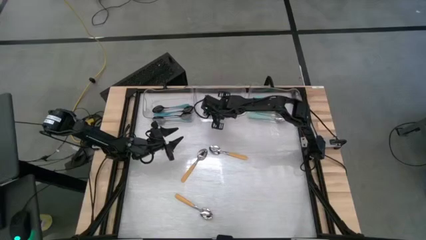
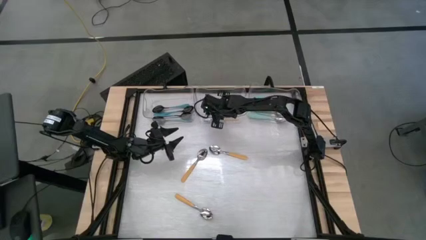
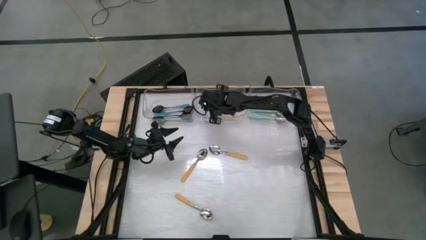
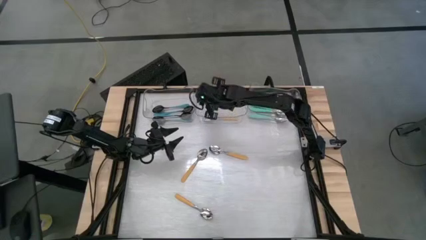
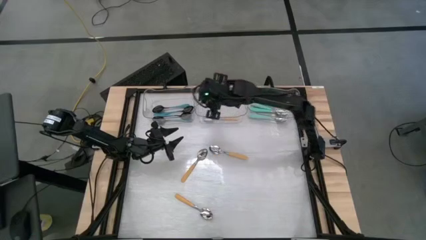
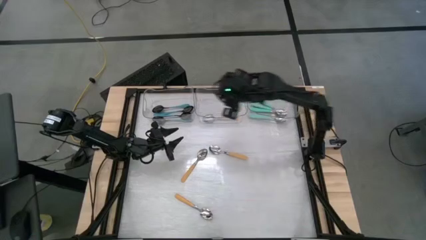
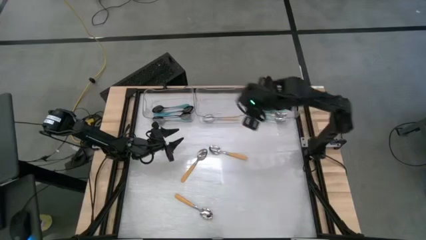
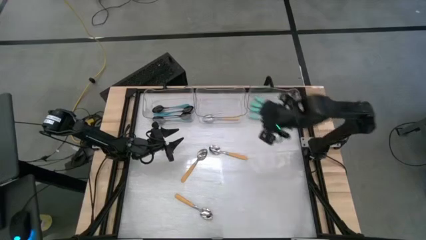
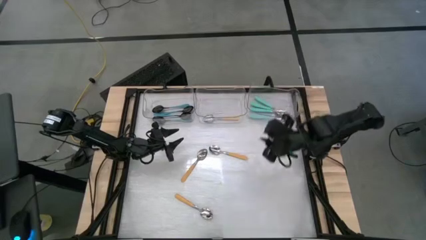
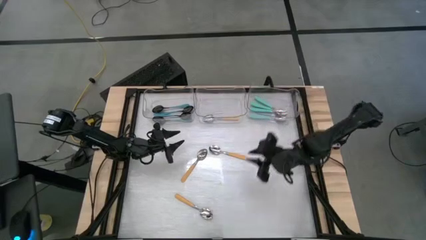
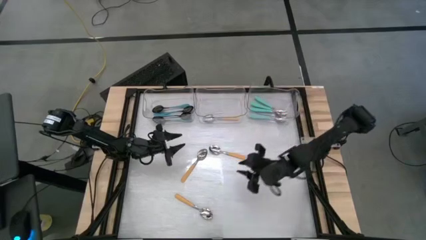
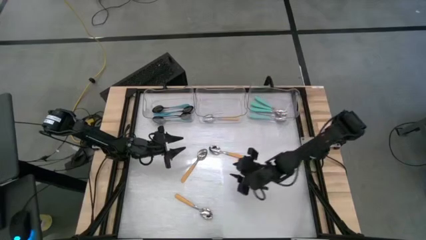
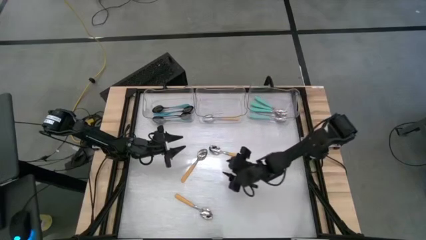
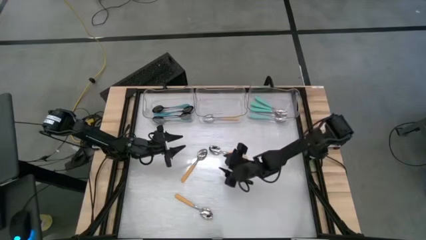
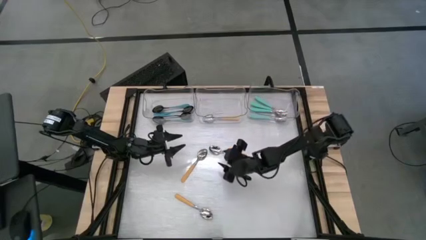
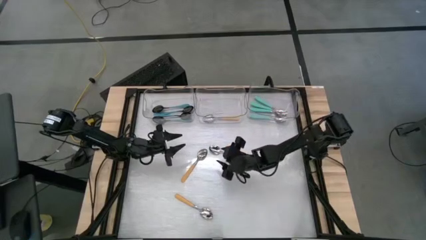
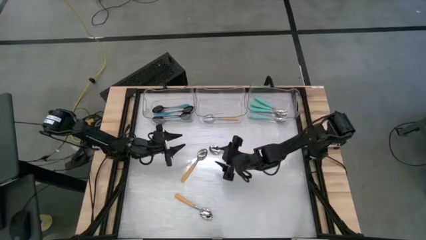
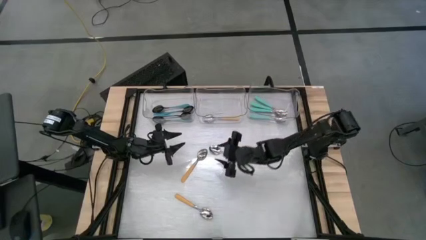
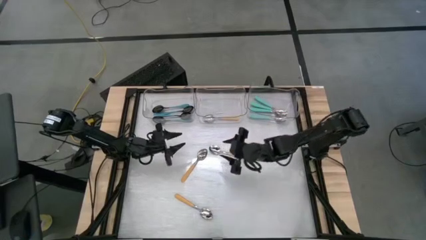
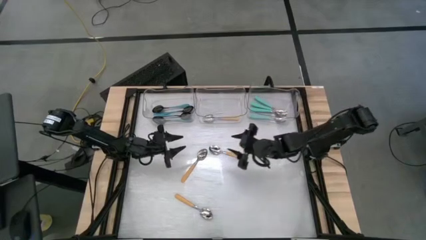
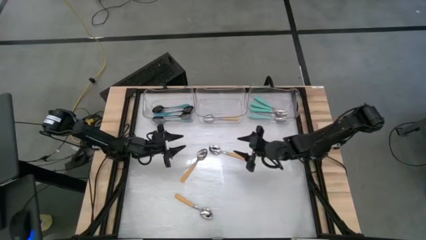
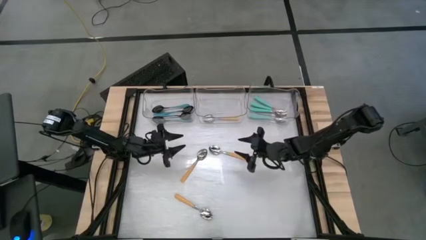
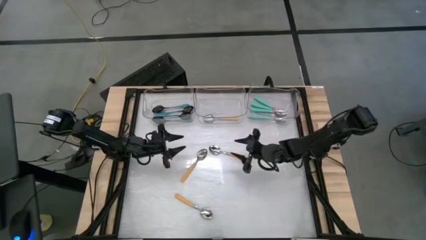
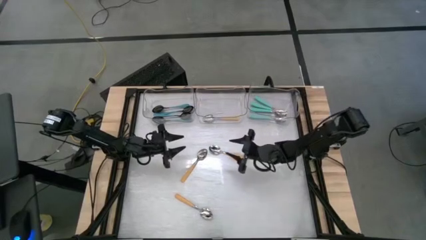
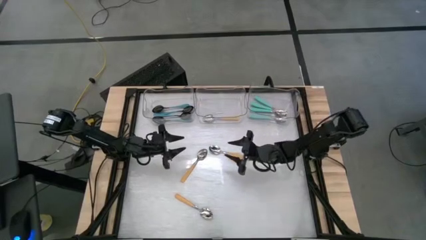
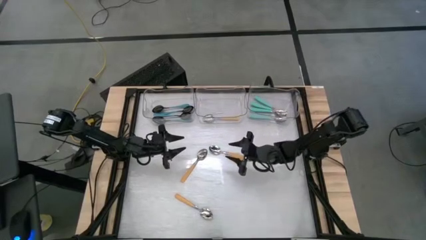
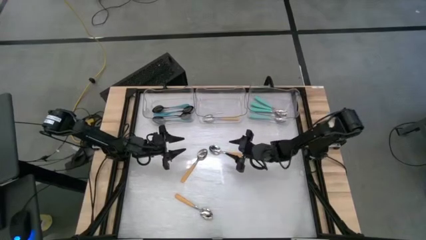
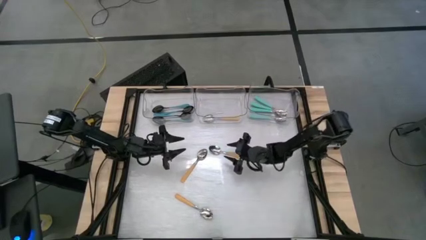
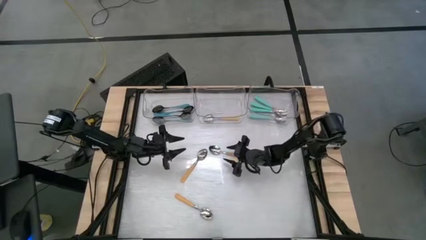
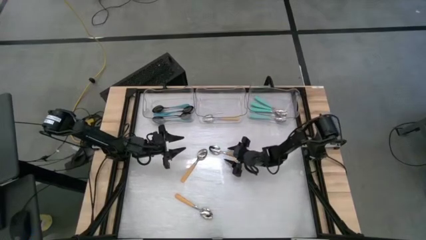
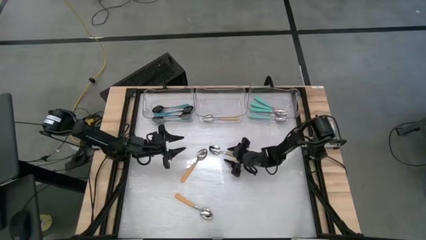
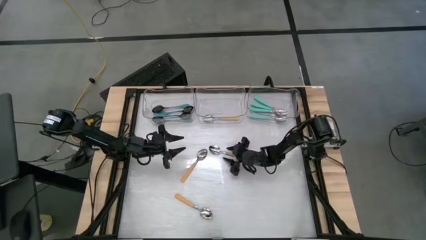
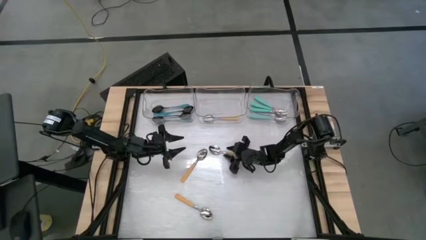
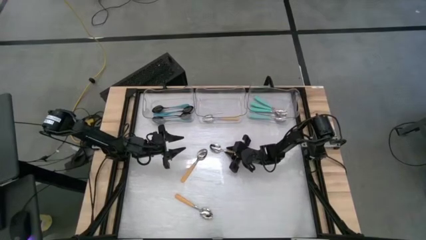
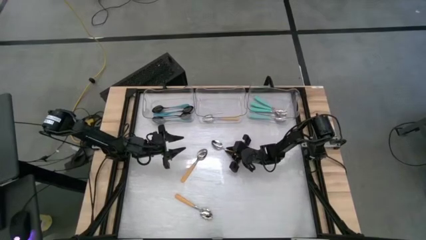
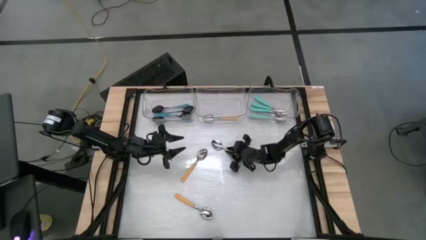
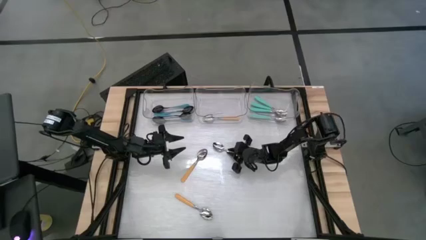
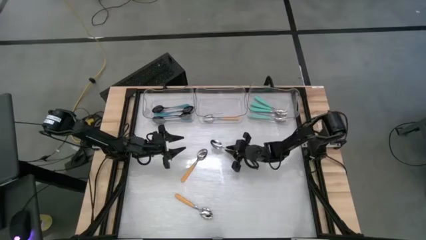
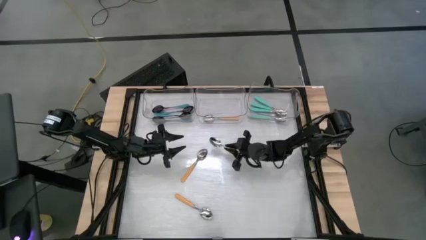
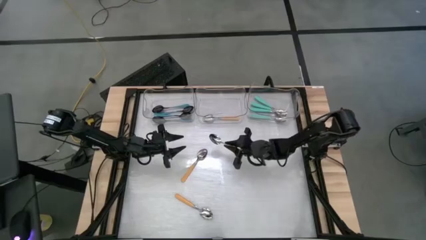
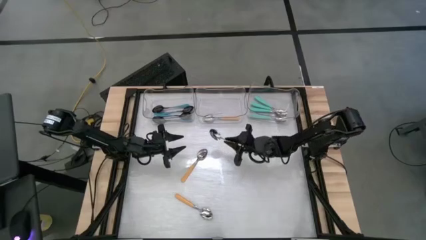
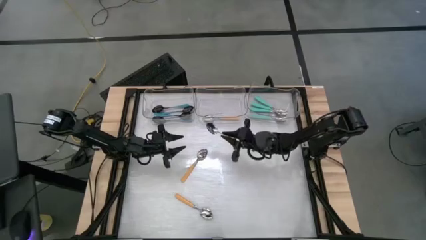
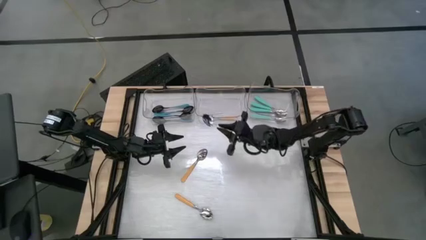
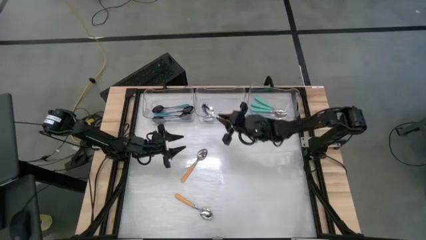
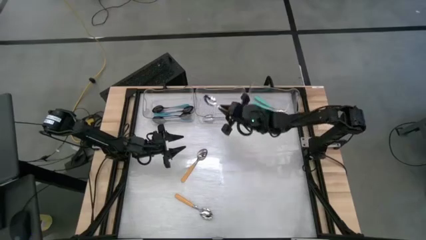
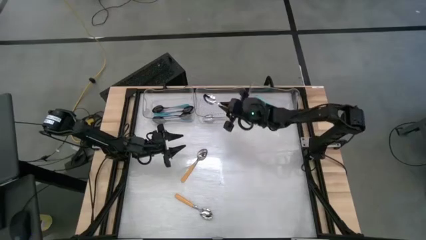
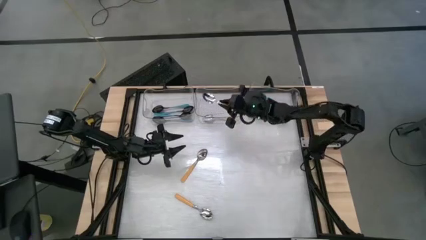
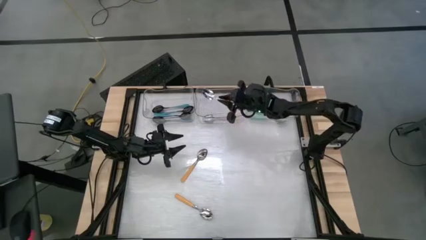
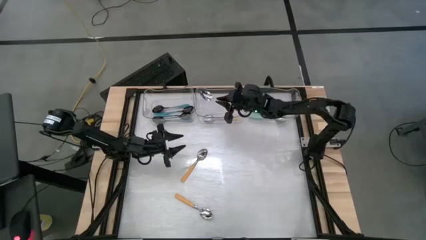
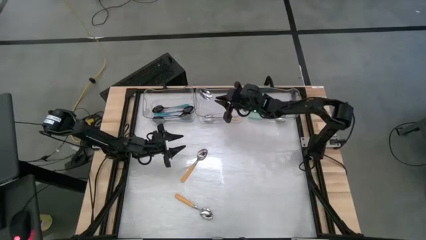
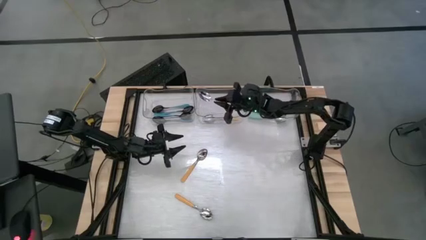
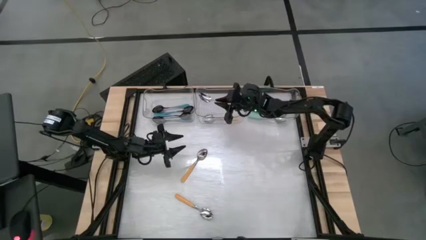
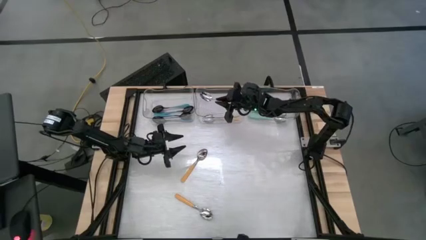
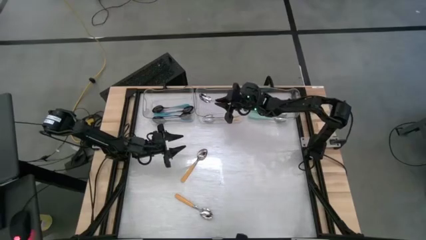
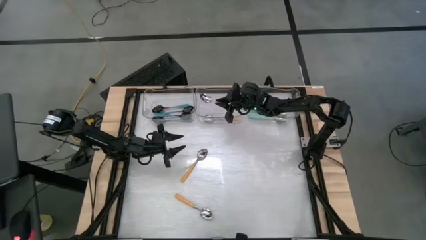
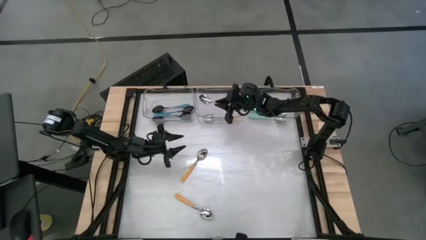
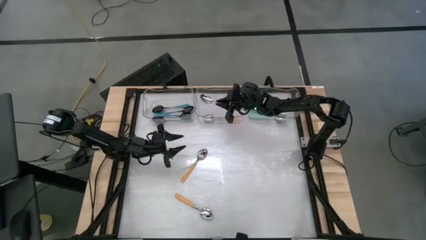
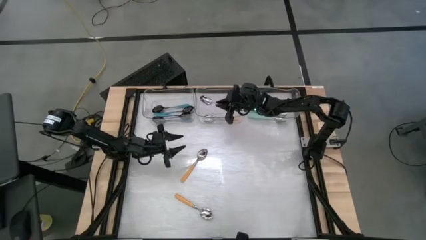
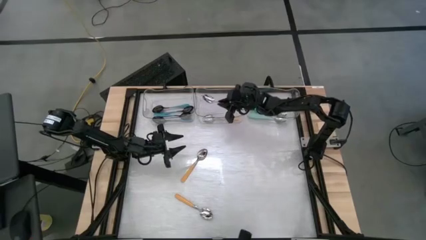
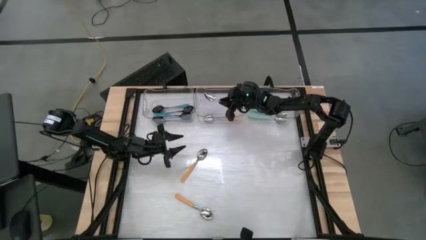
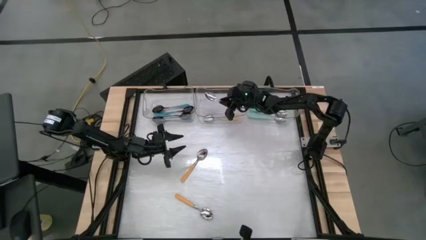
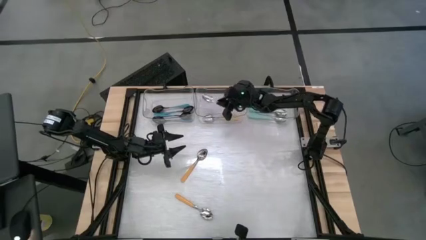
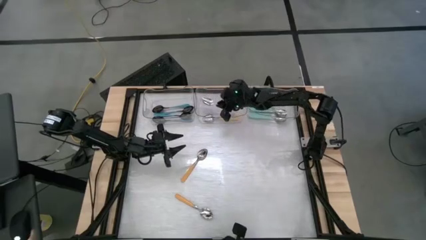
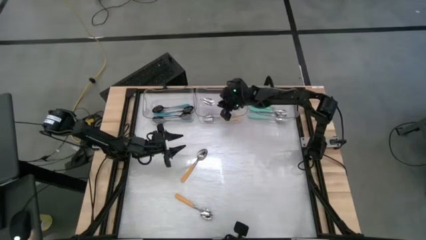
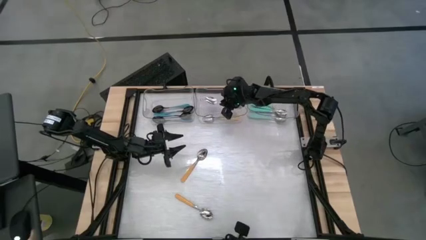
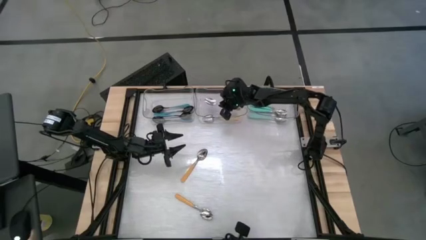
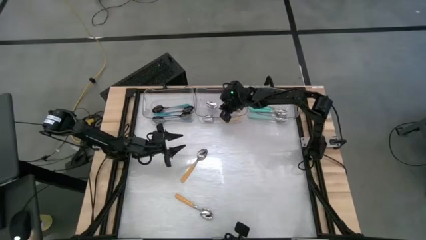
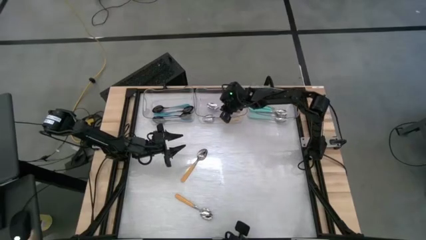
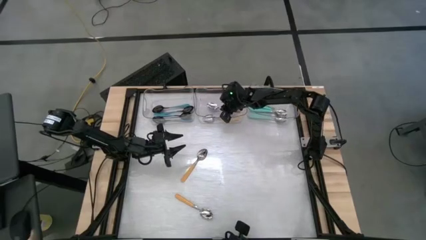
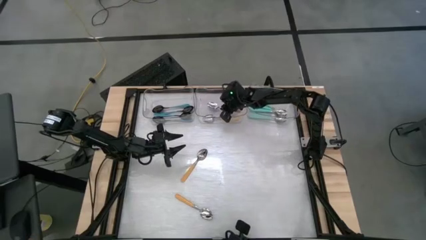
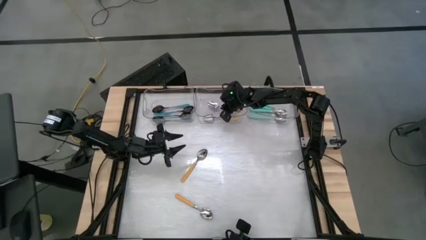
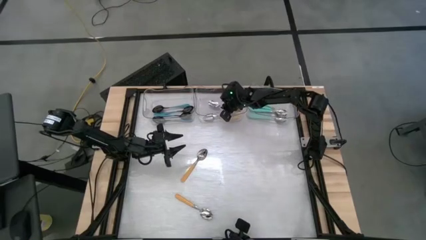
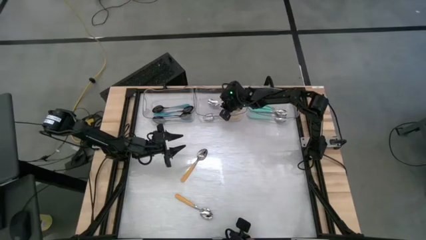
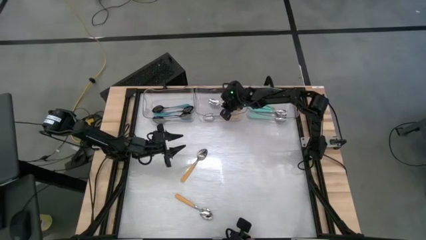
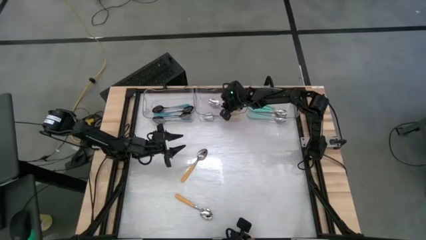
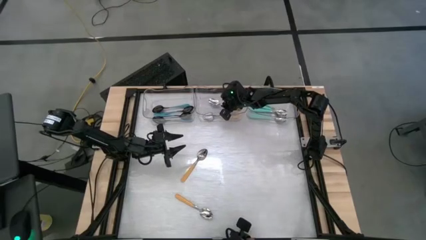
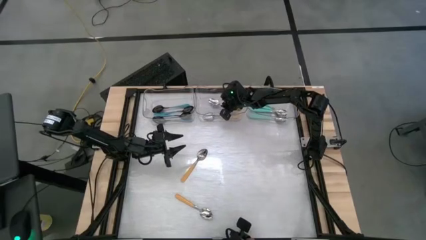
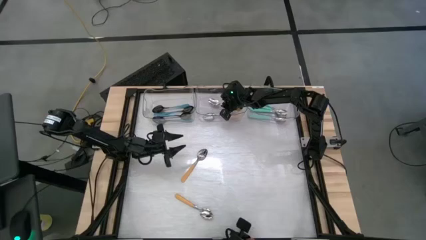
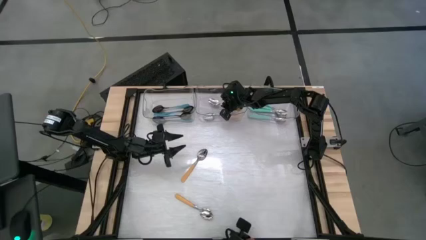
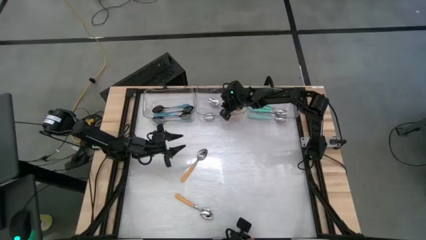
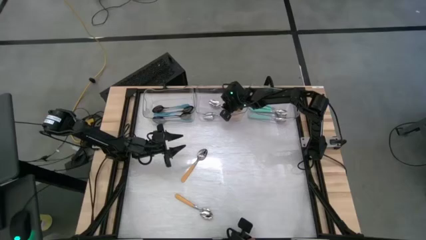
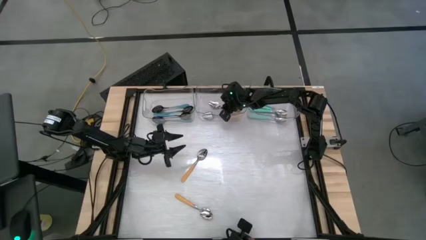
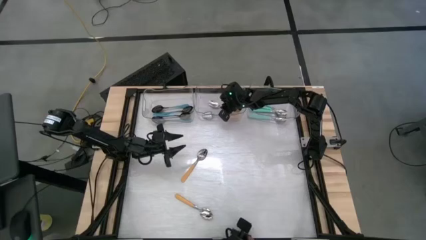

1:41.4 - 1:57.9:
Task: Sort silverware by color (type)
Put the middle right yellow spoon into the top center transparent bin
